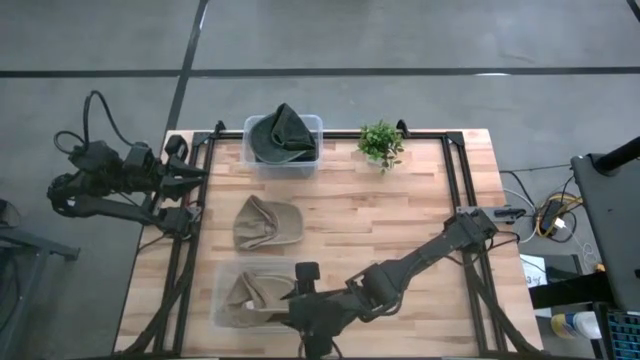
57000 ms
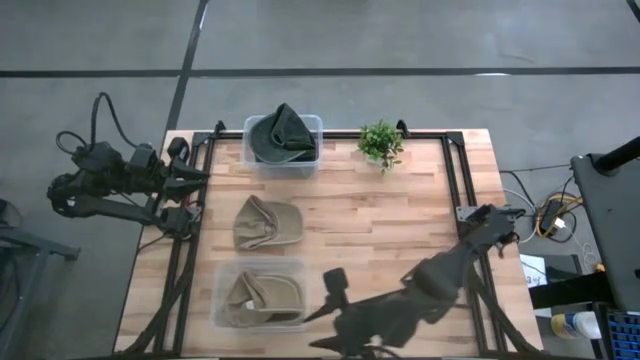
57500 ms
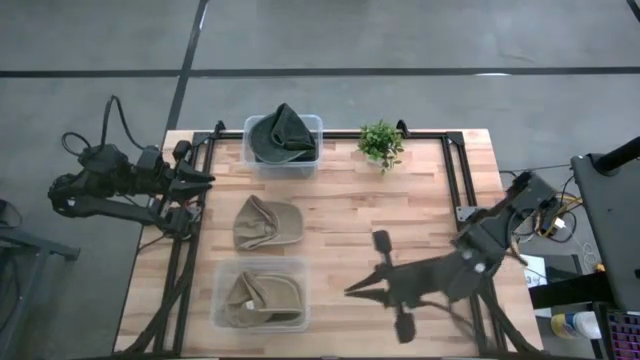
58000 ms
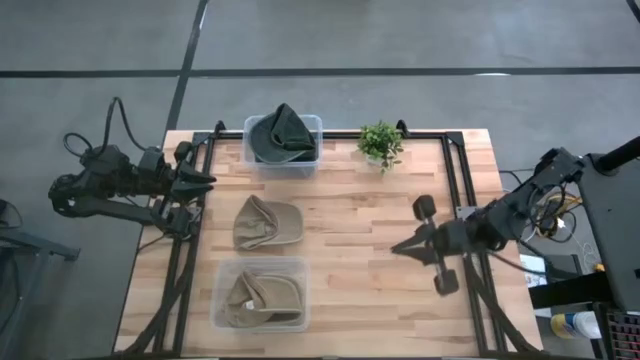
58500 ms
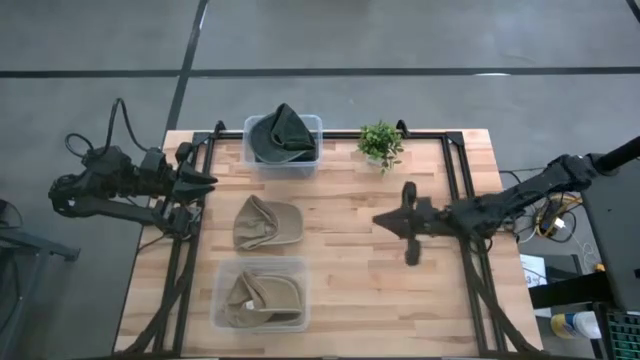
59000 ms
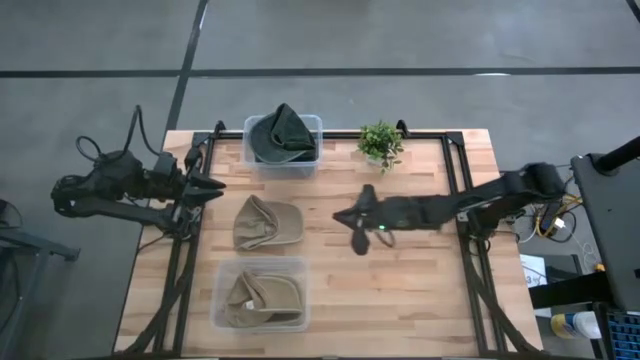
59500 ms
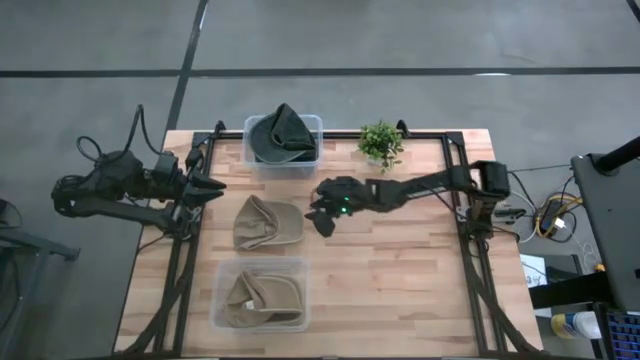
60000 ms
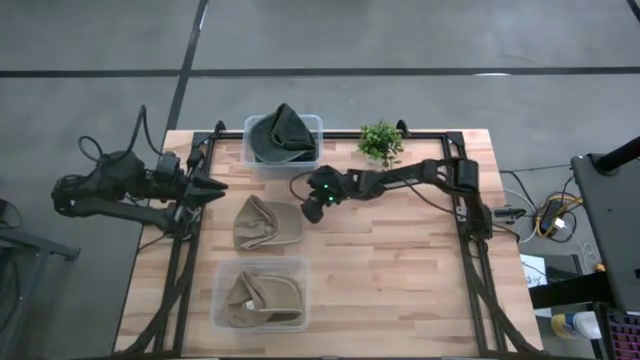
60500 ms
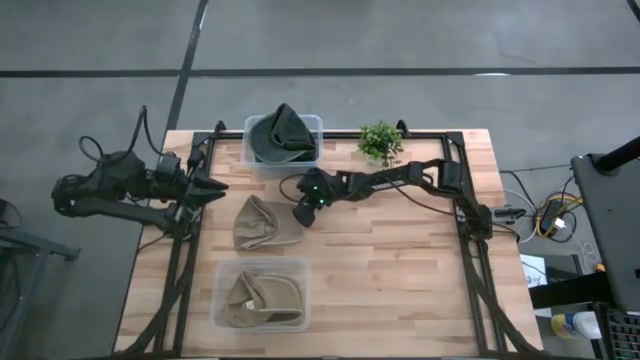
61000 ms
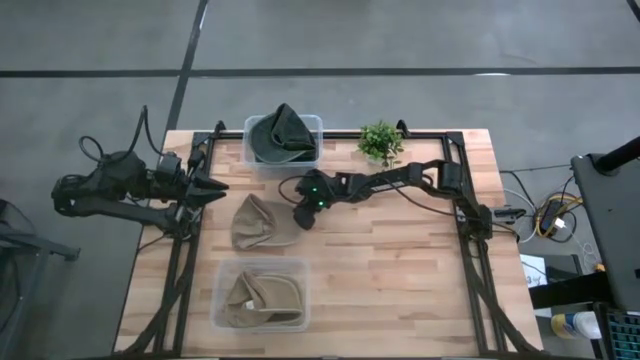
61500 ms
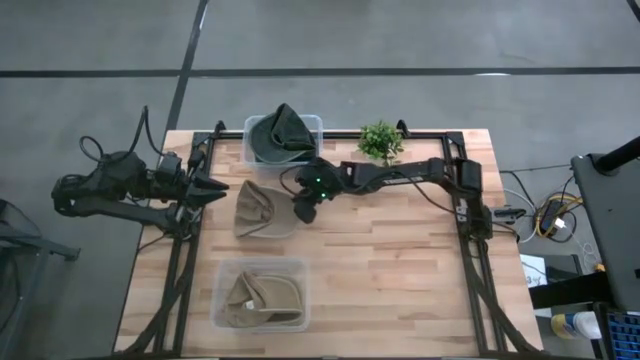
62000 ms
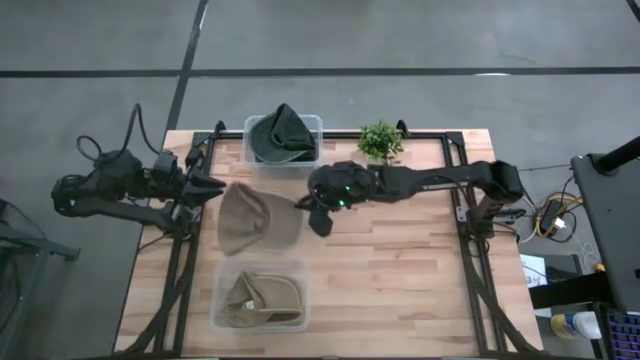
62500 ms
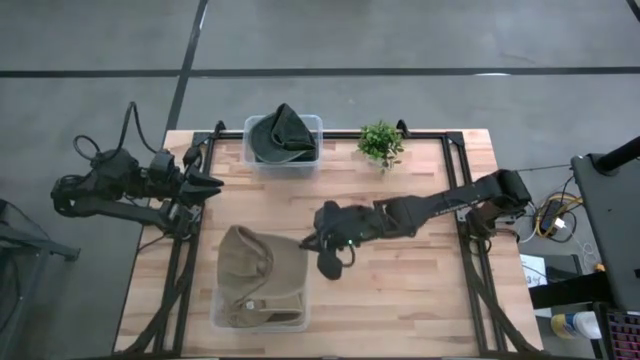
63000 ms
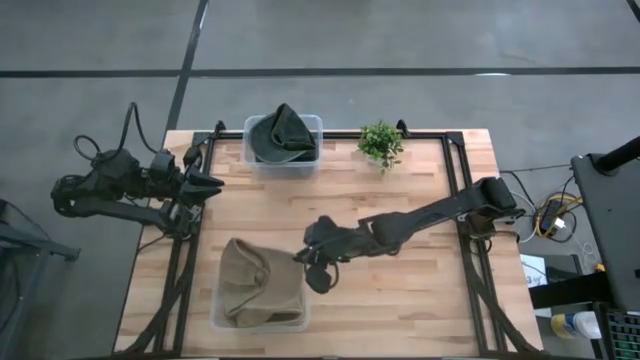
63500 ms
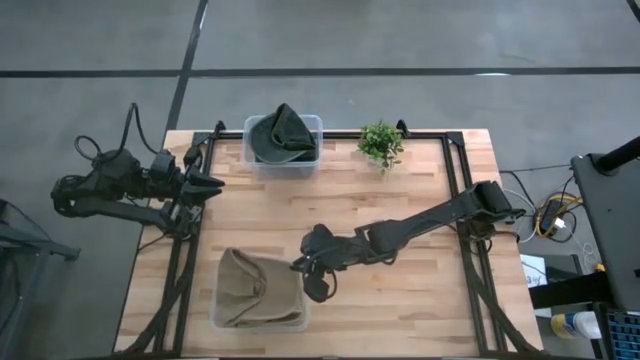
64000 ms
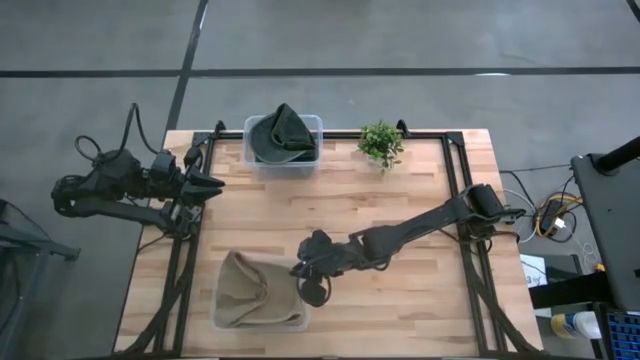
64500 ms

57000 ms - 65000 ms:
Task: Pick & Place hat
Put the brown cap in the bottom transparent bin

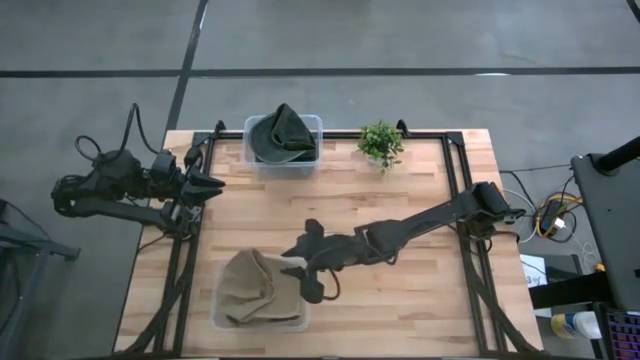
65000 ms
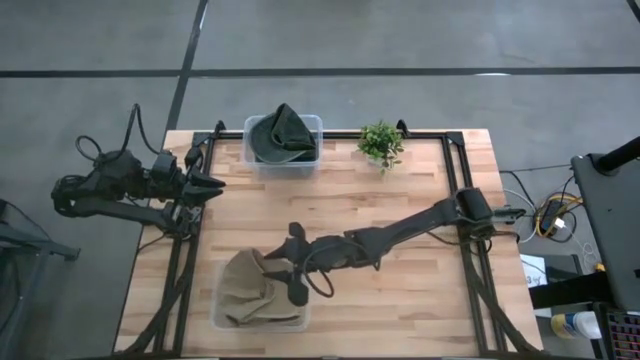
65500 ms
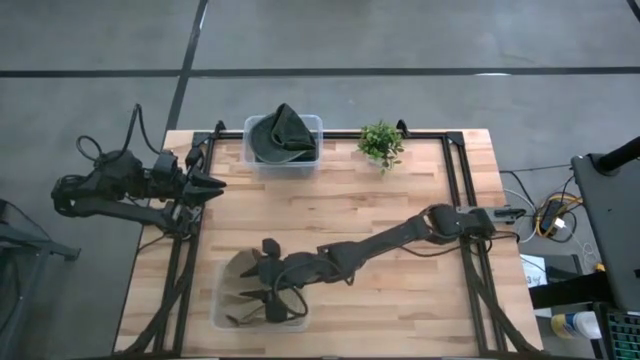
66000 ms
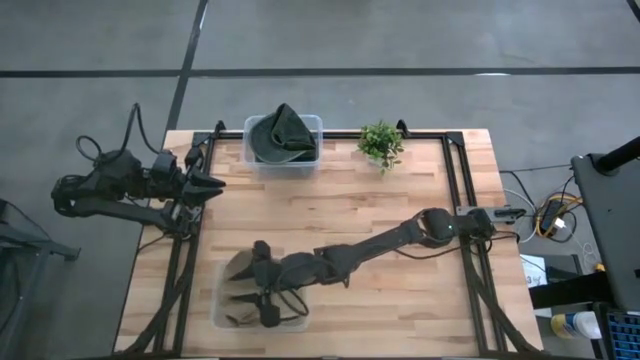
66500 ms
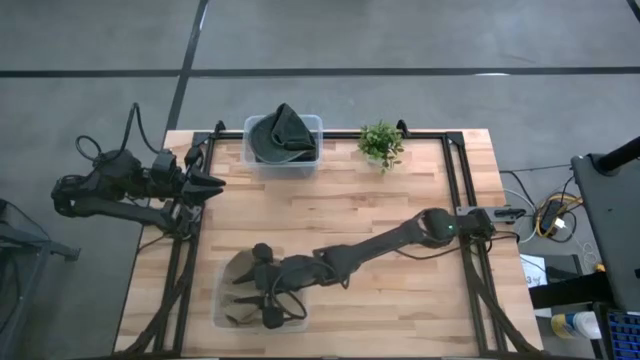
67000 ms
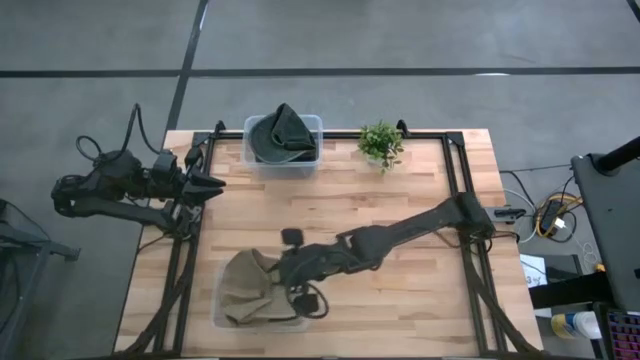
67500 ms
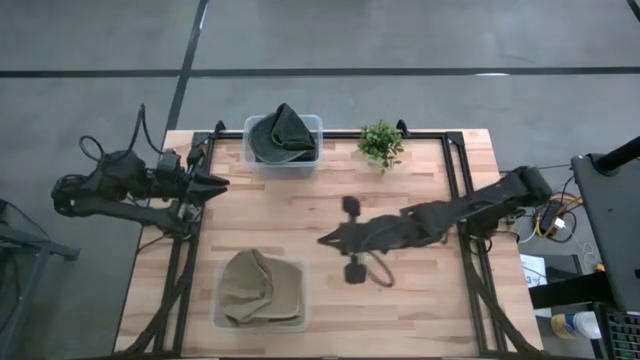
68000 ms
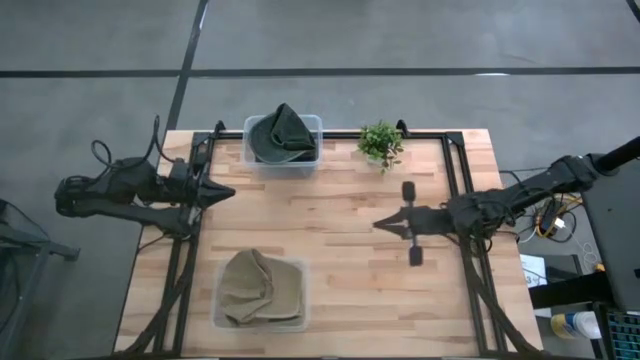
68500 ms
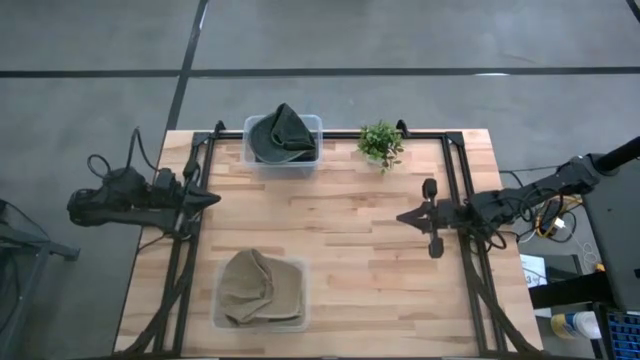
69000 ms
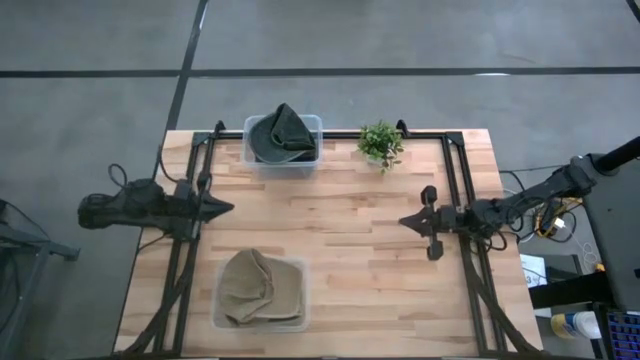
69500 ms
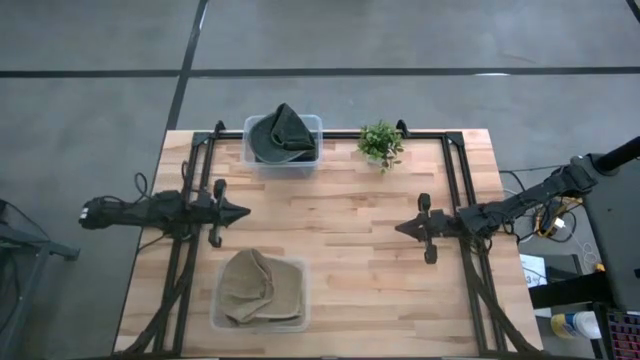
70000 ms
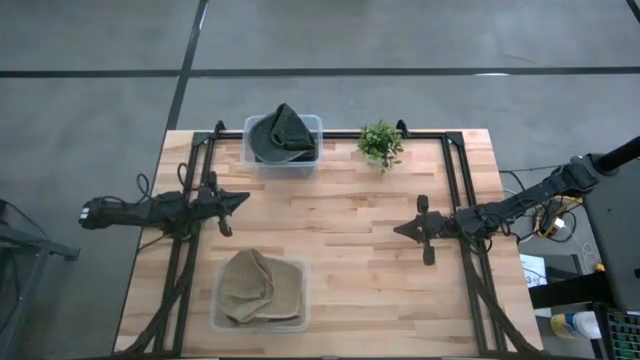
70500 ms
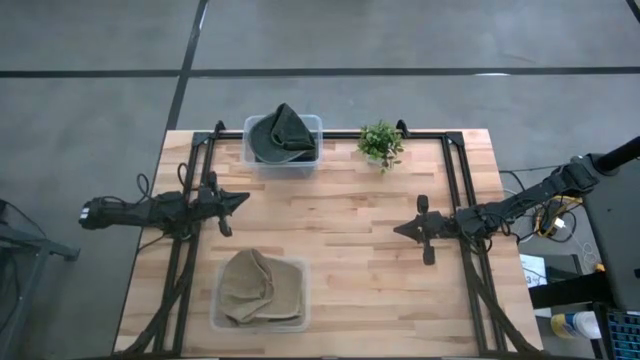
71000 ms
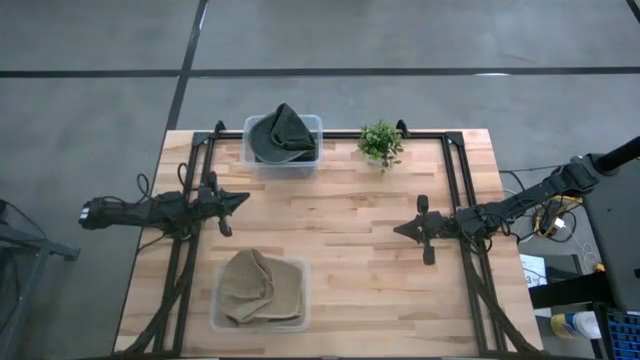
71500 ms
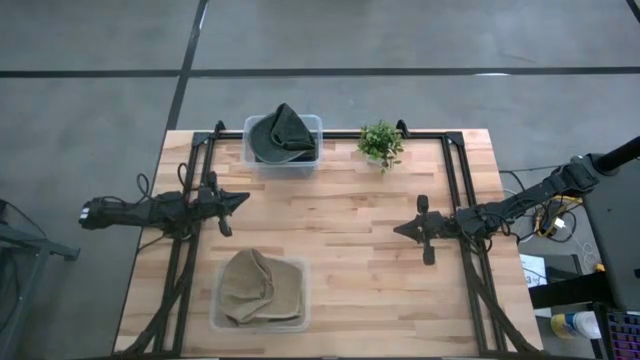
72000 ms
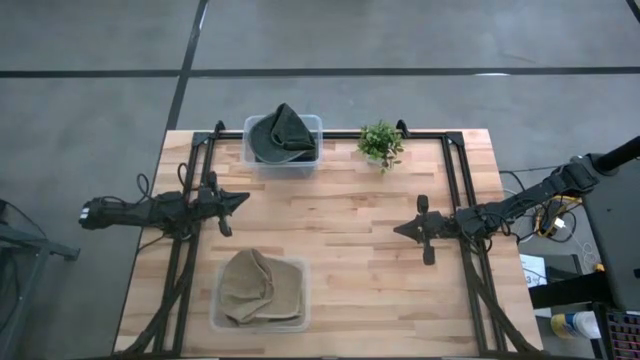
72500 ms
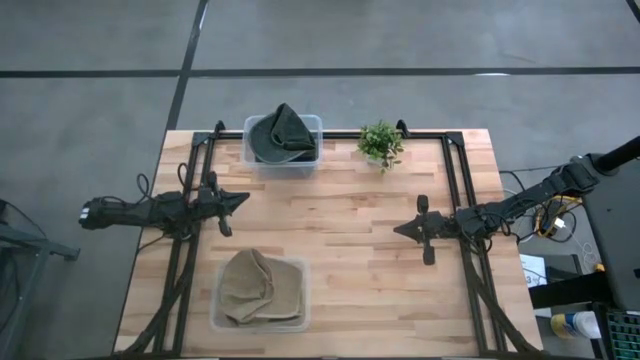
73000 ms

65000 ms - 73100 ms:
Return to Home Position

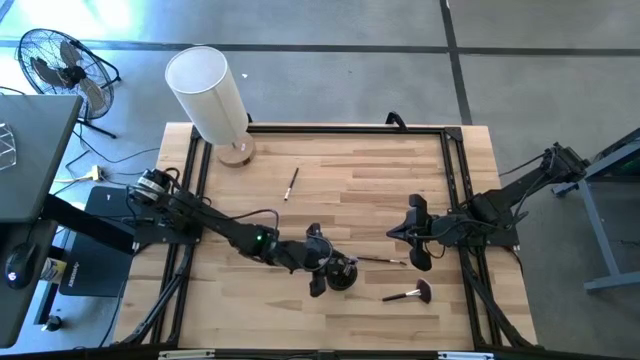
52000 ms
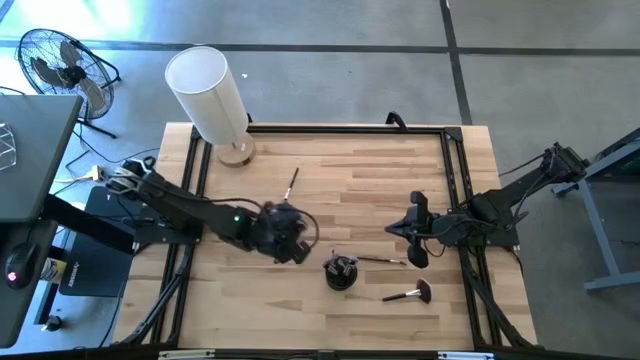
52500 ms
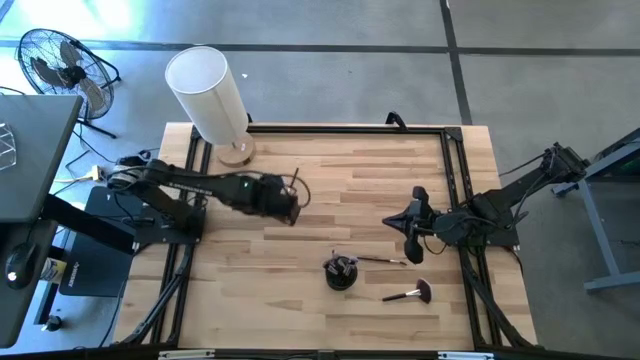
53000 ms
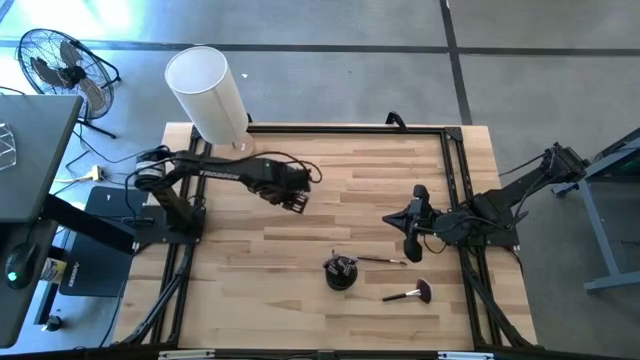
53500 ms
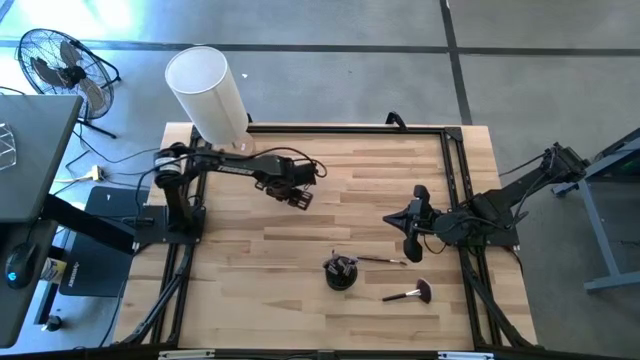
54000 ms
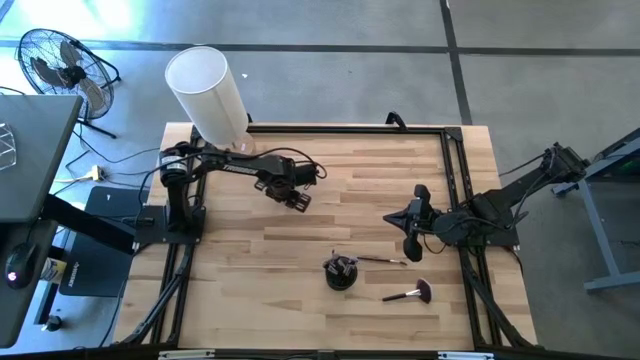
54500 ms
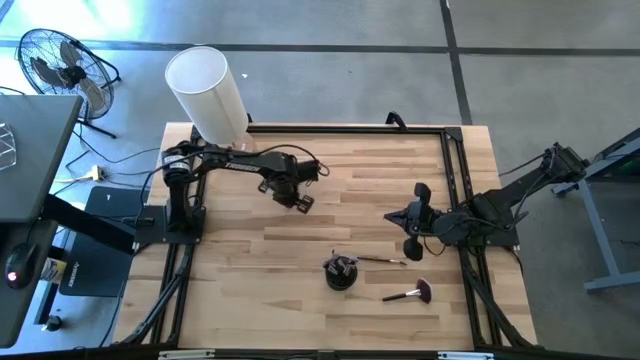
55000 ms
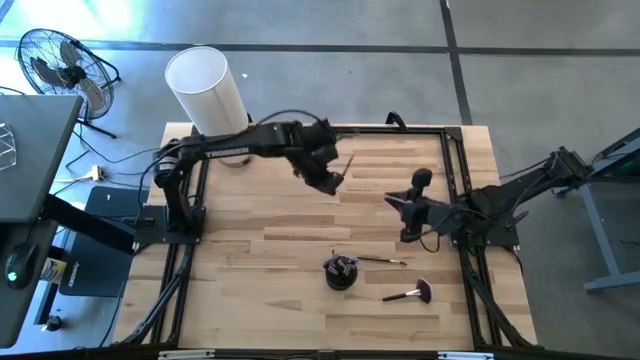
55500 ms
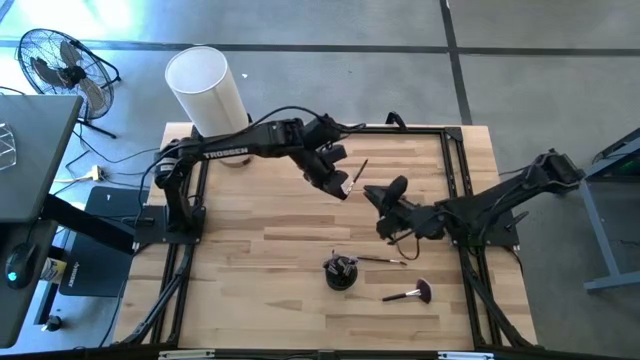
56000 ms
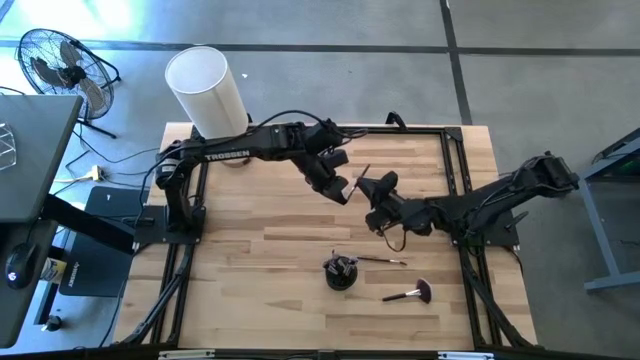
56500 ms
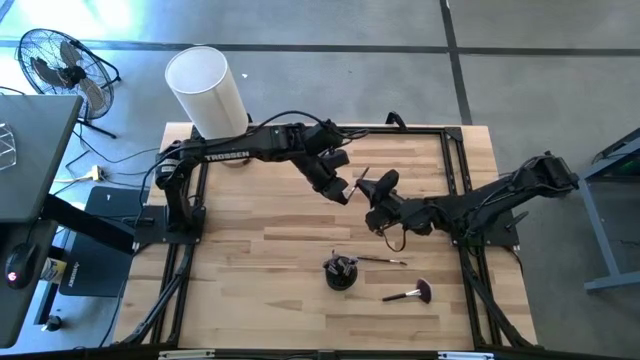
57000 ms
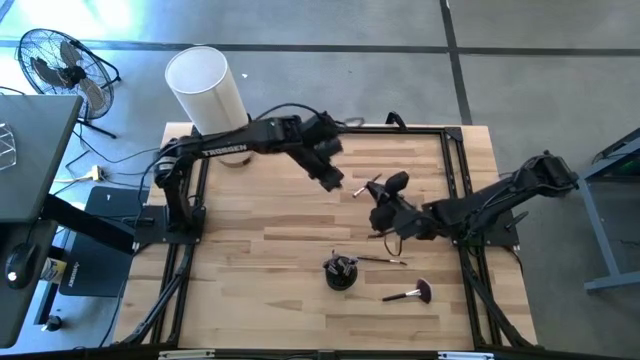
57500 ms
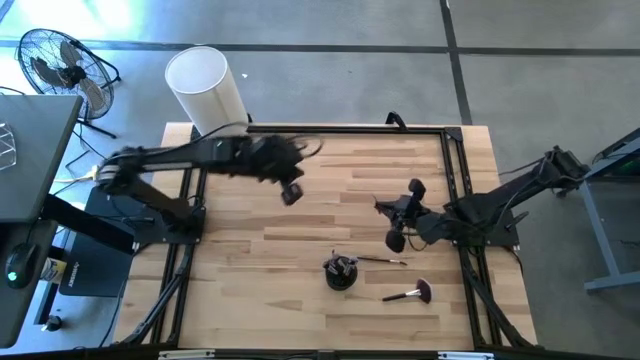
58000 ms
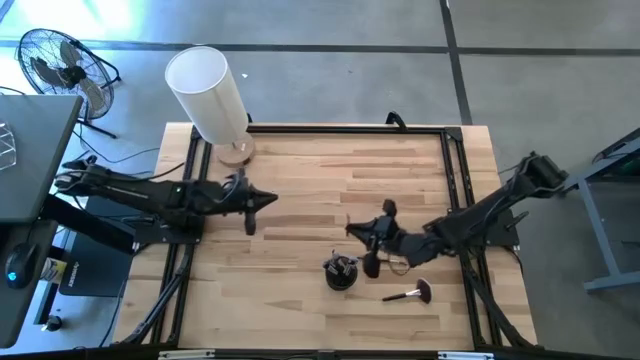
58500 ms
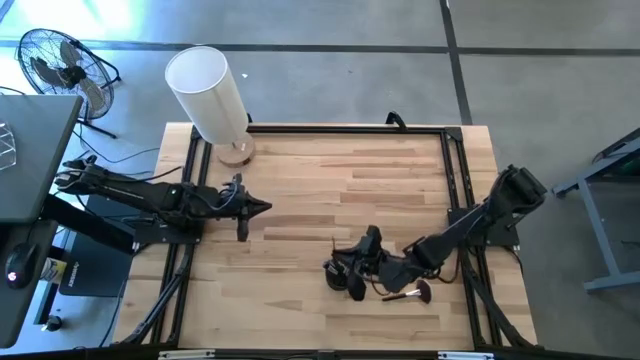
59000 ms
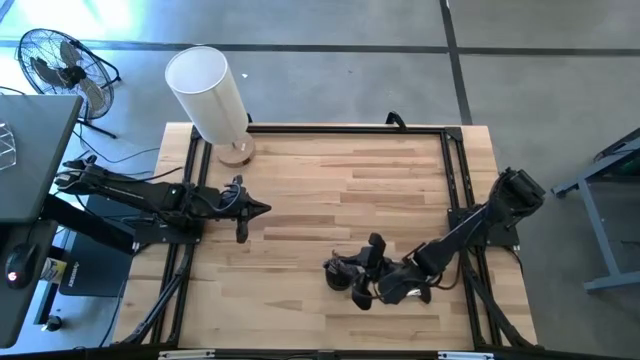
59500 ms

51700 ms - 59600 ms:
Task: Pick & Place Makeup Supplies
Put the makeup brush into the black makeup holder
